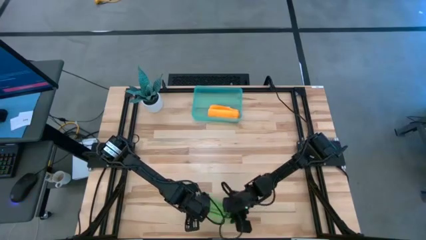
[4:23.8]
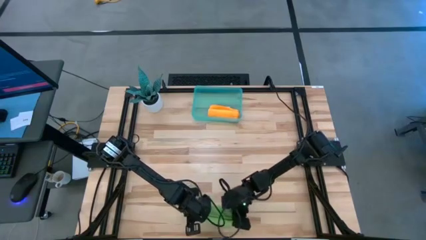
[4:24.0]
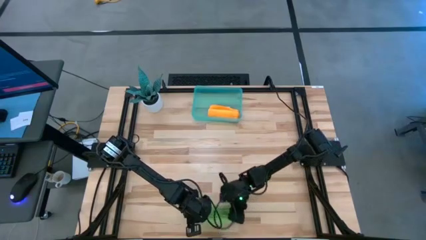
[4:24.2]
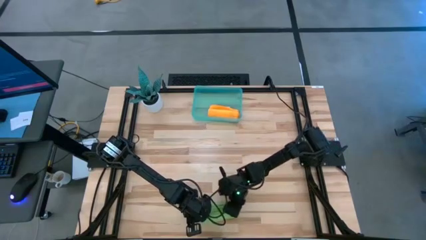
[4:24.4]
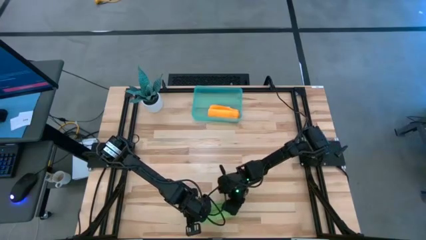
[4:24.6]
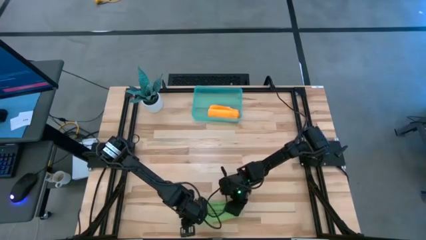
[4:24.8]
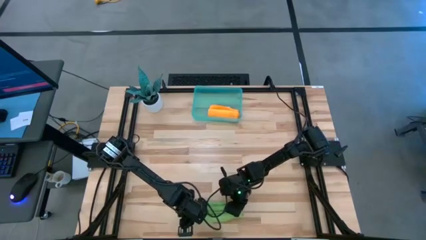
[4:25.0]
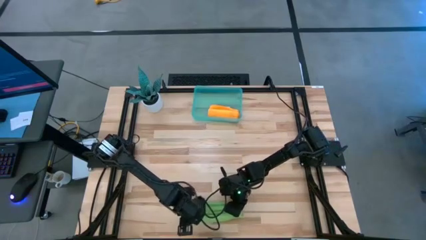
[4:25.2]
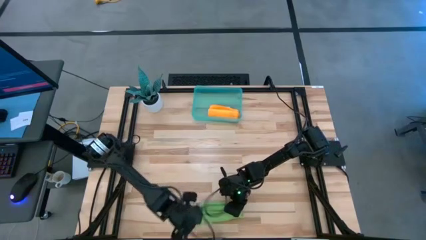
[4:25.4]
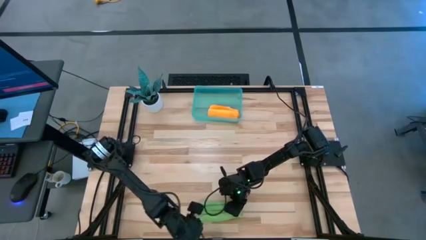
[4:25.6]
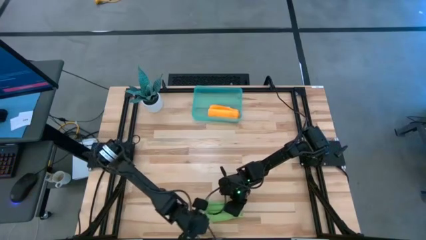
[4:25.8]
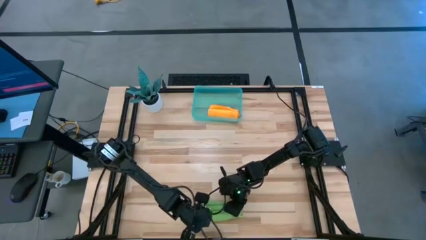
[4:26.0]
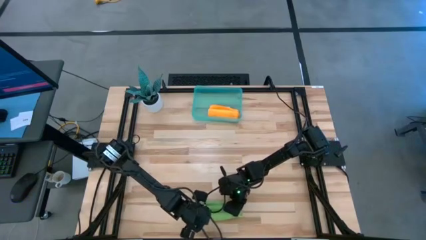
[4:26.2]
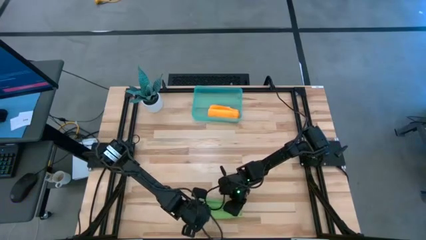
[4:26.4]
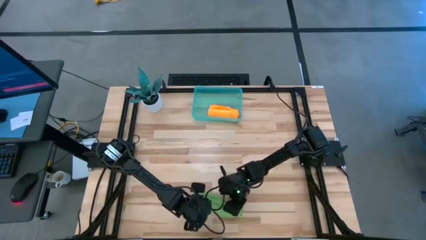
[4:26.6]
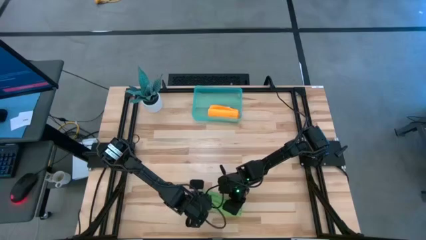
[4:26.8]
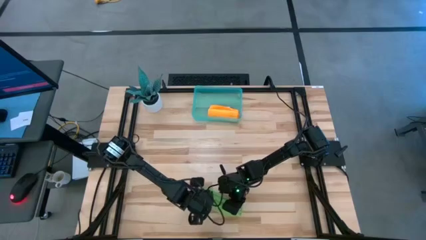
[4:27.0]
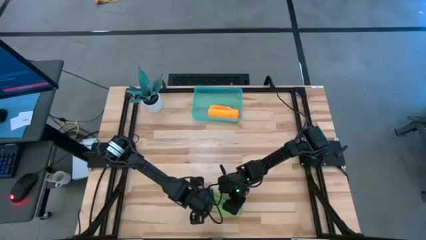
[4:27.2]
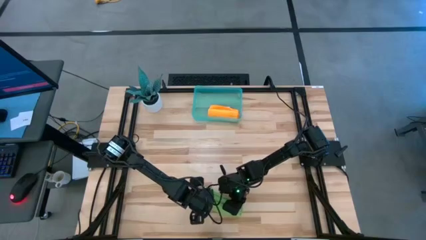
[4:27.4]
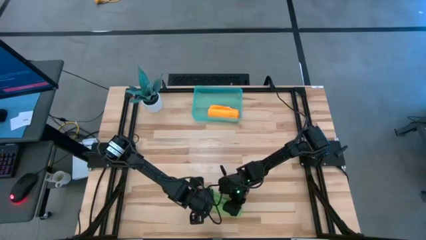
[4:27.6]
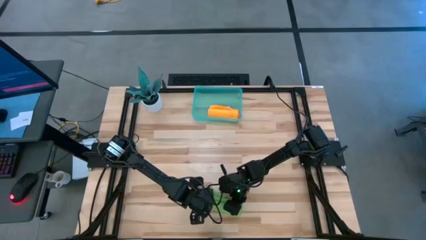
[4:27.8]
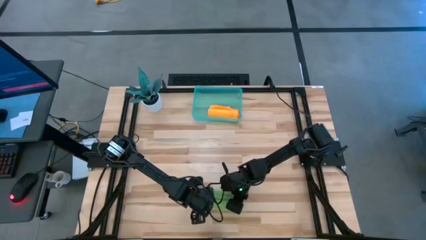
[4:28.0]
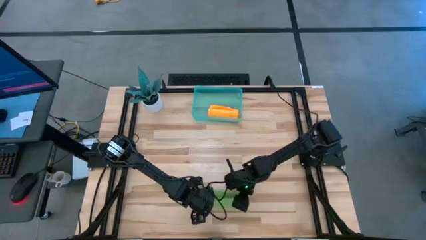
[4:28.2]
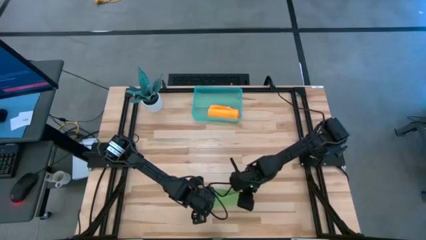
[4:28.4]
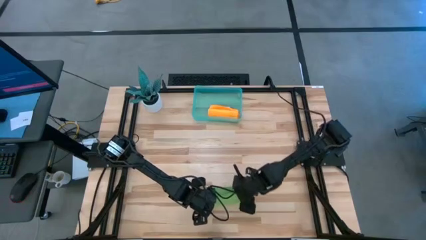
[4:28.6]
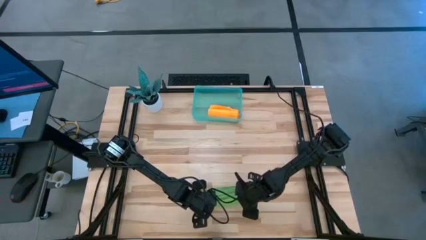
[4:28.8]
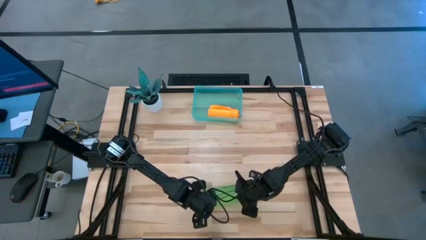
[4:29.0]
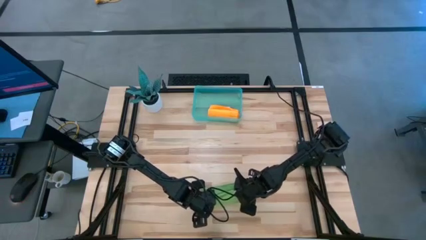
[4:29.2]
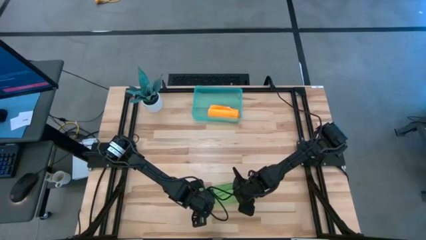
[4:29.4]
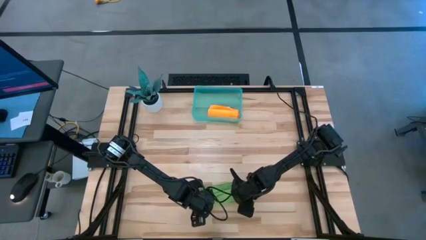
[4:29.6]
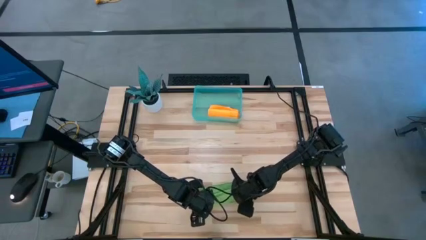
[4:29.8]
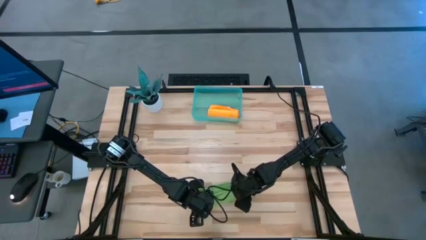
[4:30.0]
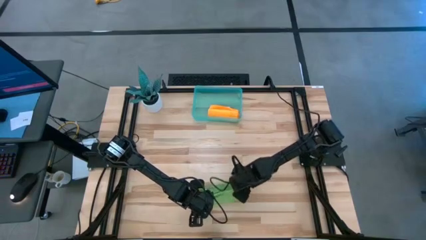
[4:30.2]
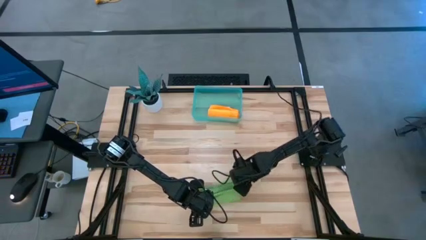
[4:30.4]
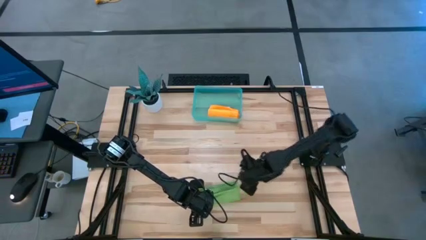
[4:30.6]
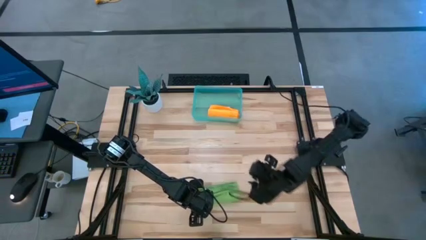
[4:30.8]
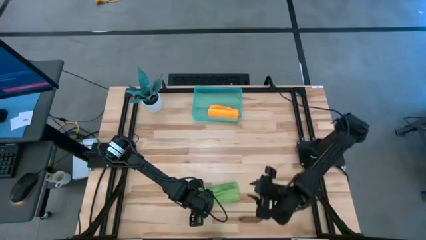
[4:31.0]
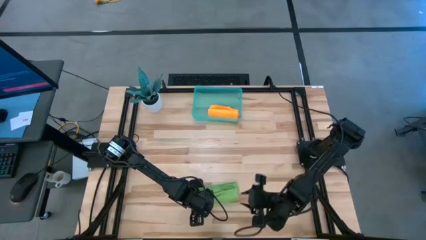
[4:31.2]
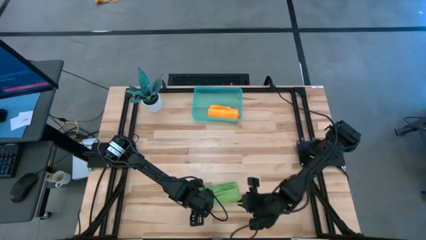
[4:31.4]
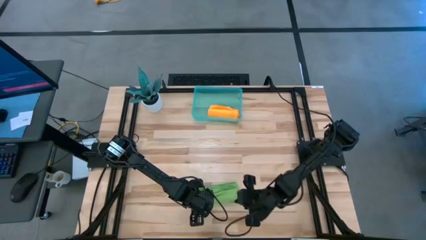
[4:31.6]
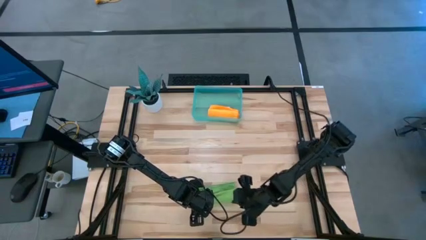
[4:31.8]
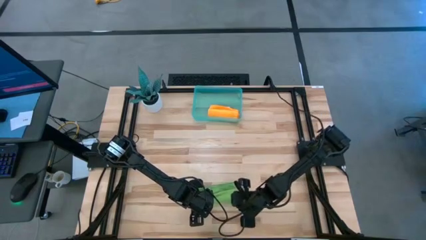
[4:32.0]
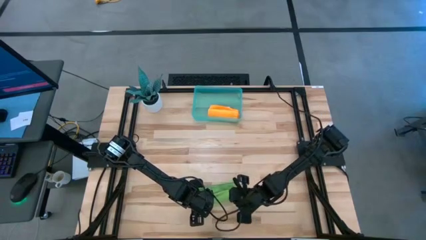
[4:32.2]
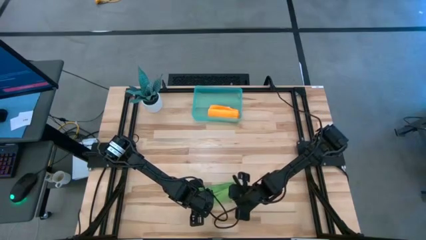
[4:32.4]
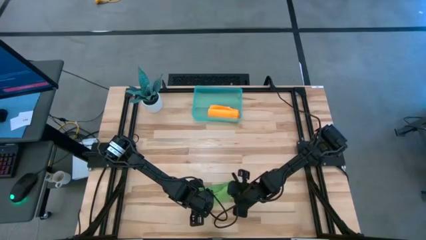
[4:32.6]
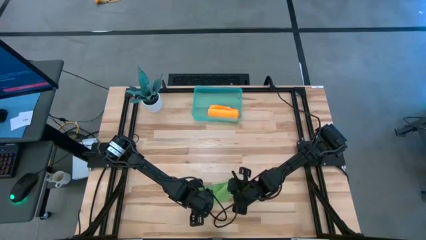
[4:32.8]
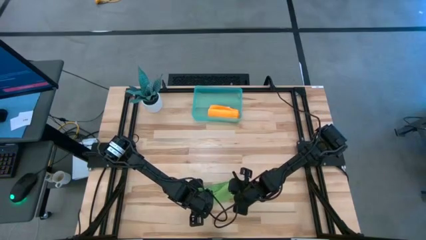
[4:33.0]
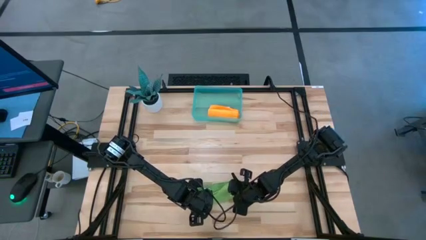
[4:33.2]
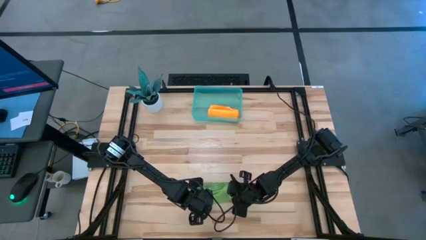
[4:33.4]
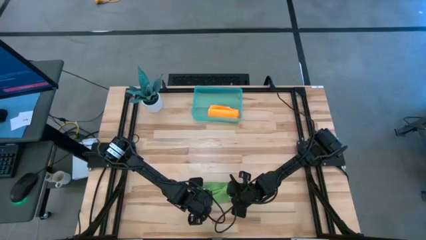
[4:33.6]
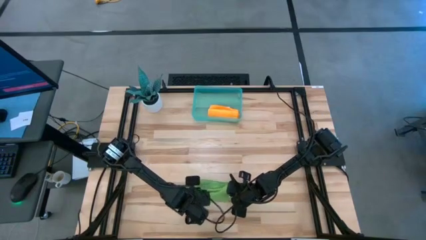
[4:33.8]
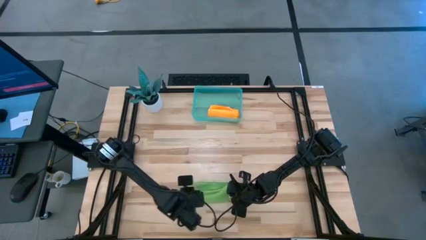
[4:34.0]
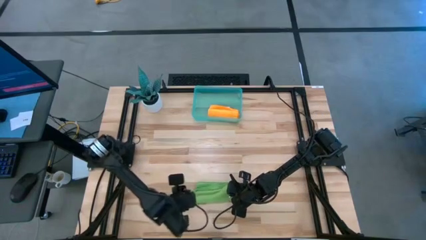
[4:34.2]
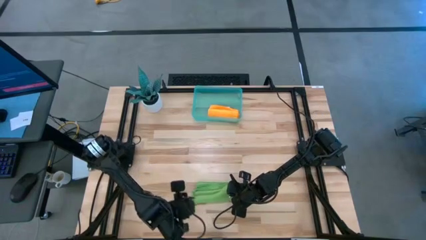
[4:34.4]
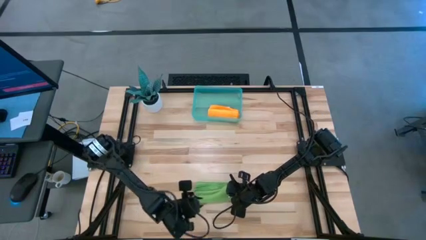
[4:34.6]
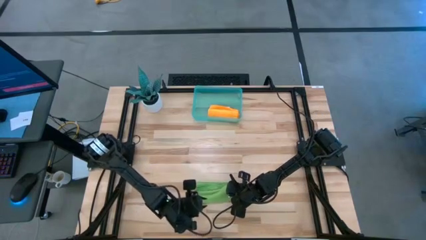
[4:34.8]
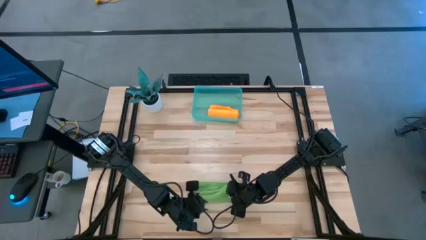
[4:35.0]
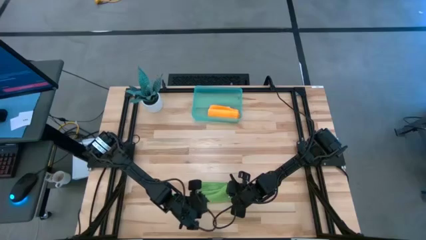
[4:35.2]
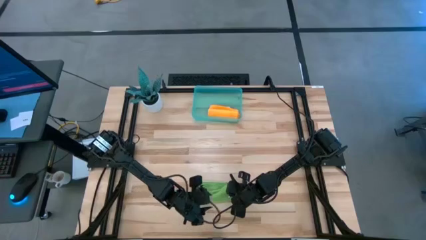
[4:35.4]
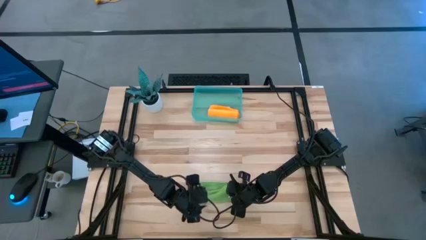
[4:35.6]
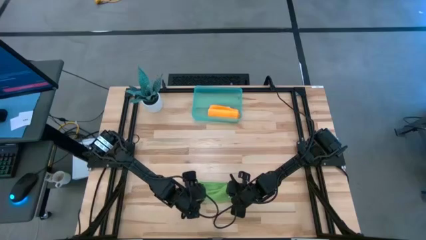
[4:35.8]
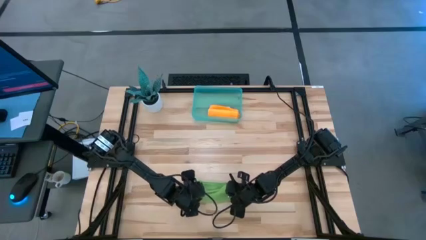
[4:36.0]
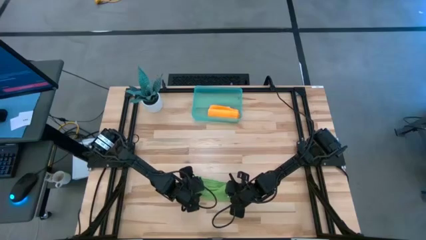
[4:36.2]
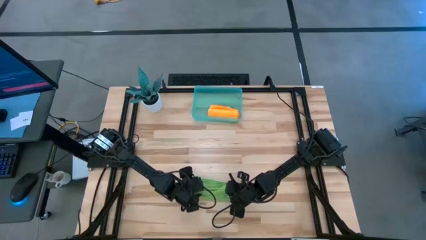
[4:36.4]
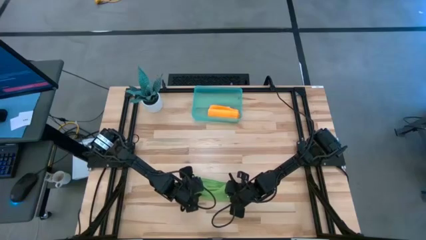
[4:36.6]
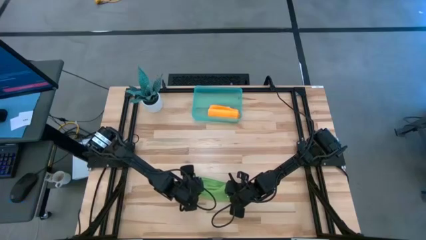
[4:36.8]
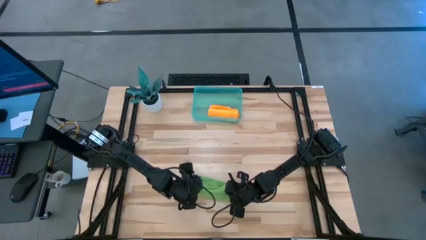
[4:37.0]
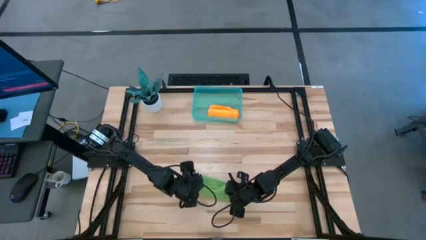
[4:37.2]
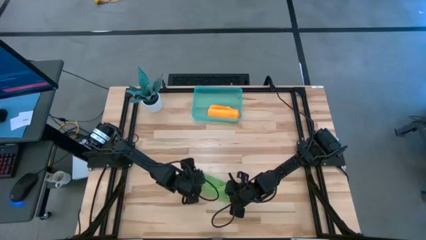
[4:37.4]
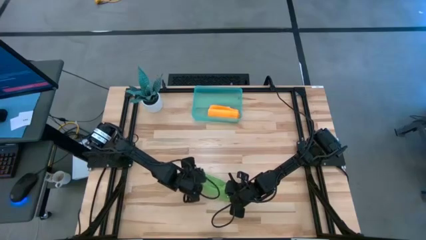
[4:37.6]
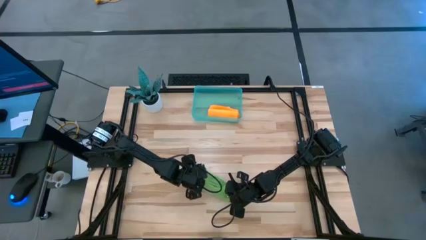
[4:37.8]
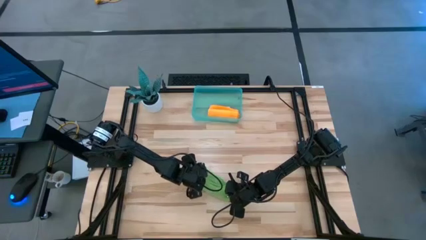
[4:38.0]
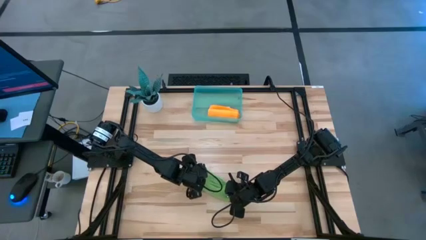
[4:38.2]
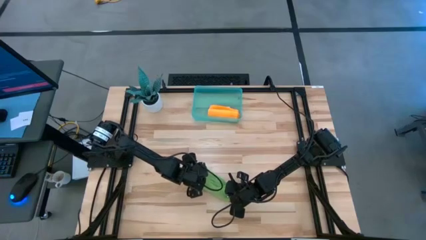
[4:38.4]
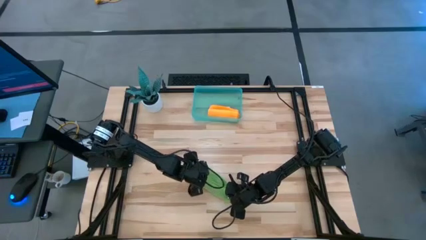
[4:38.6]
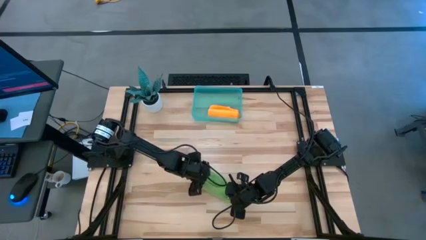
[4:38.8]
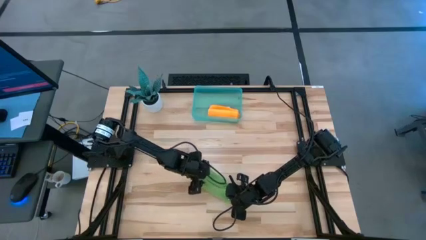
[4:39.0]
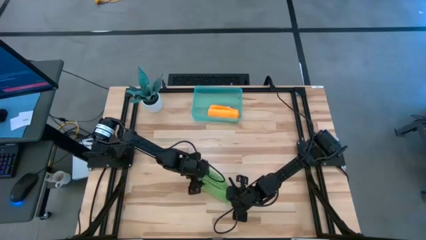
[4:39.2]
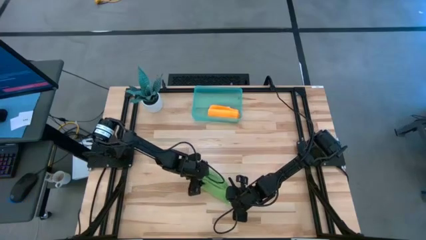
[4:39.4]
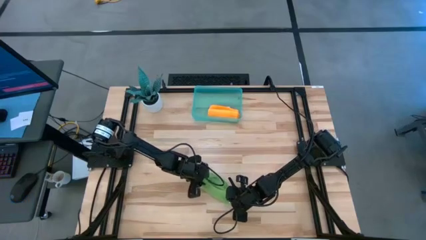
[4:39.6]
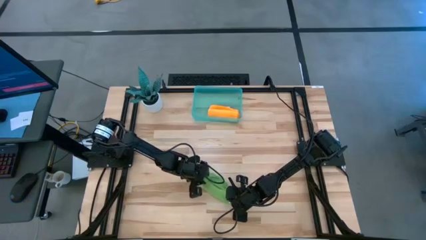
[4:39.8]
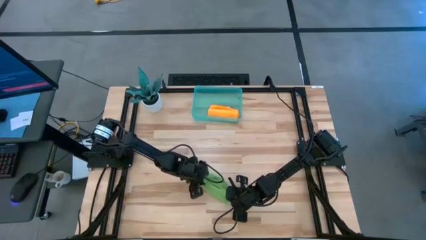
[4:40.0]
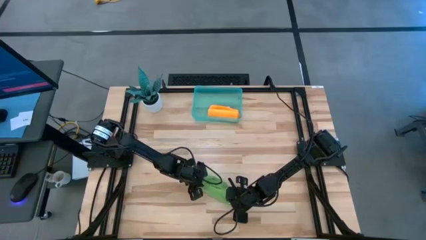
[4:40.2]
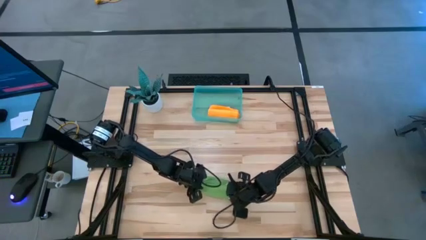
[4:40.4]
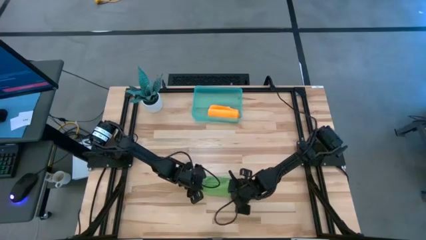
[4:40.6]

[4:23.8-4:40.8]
Task: Roll microfiber towels into tight, uniform cylinder then place into a basket
Roll the green microfiber cloth
